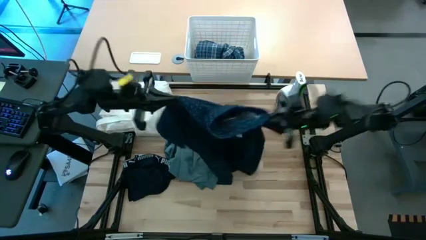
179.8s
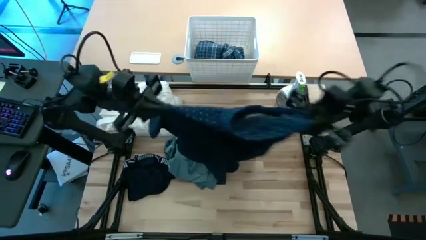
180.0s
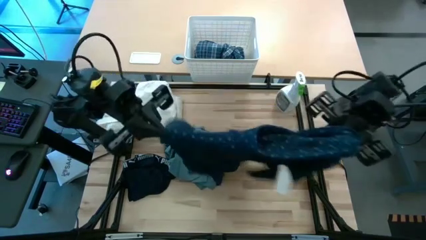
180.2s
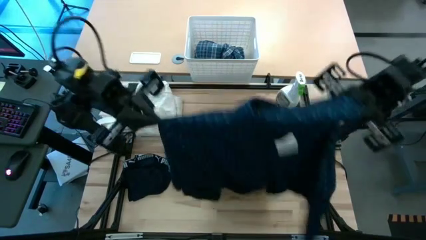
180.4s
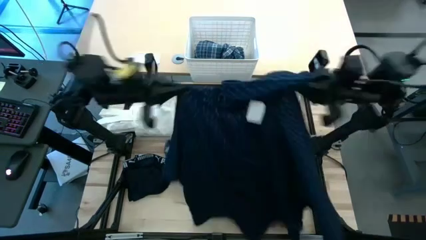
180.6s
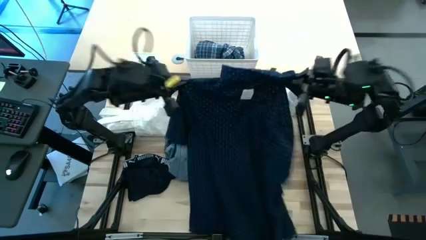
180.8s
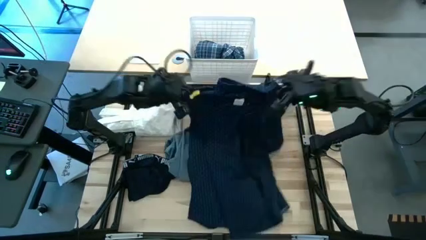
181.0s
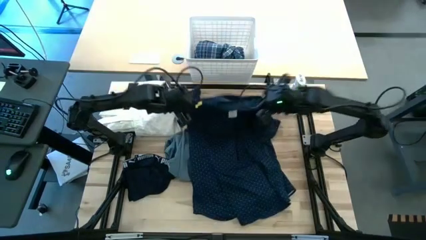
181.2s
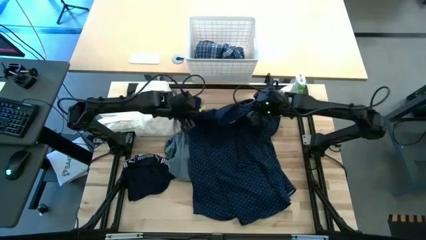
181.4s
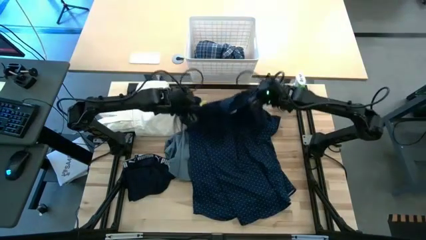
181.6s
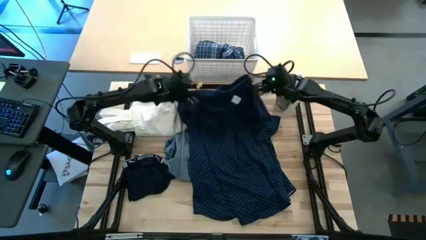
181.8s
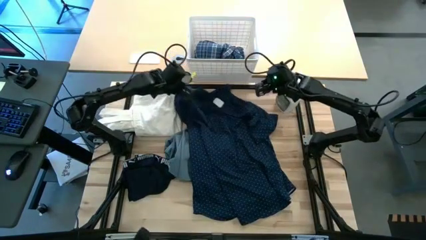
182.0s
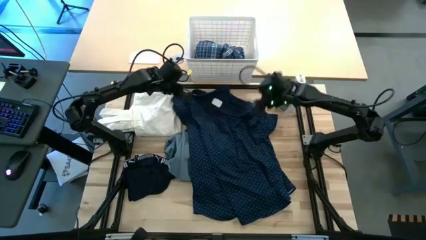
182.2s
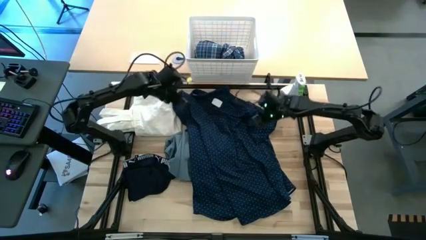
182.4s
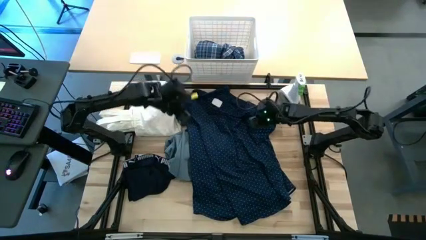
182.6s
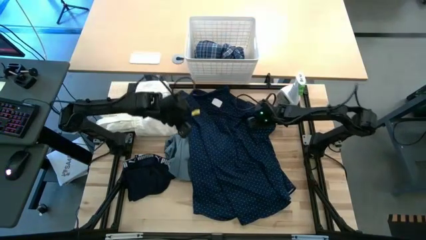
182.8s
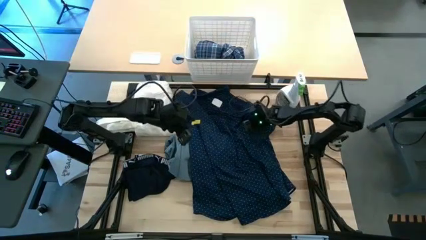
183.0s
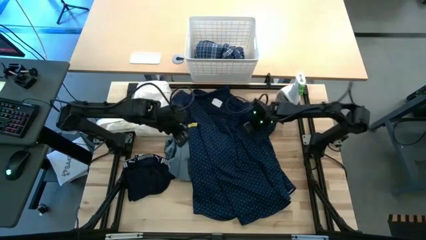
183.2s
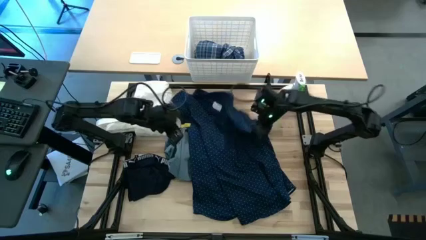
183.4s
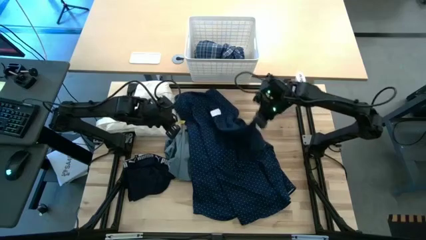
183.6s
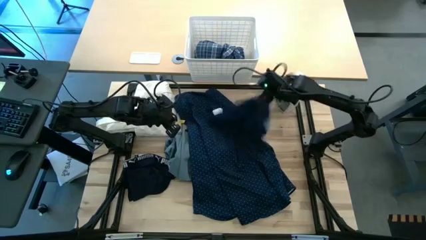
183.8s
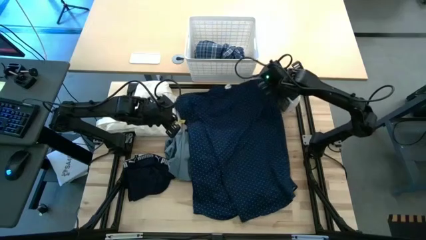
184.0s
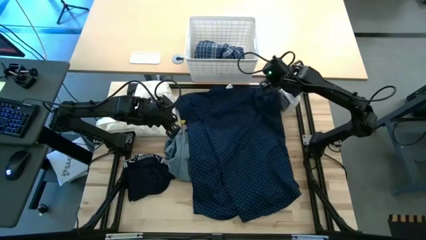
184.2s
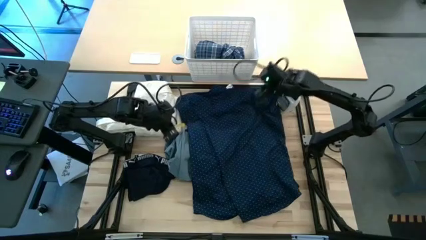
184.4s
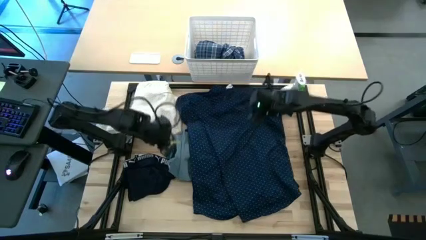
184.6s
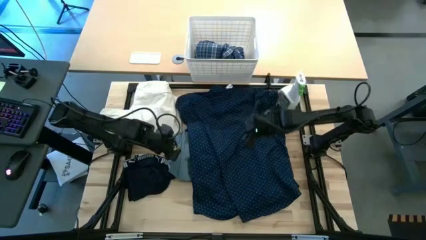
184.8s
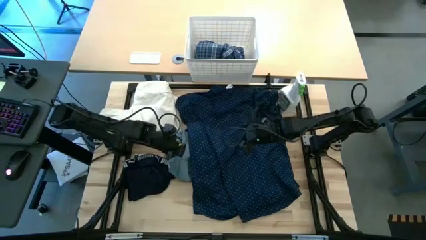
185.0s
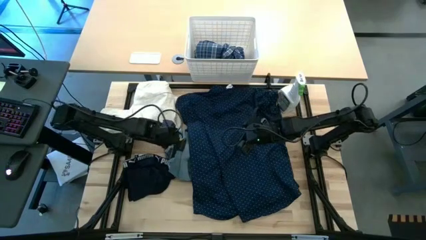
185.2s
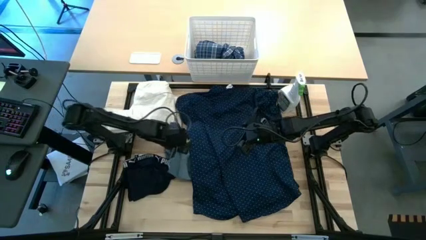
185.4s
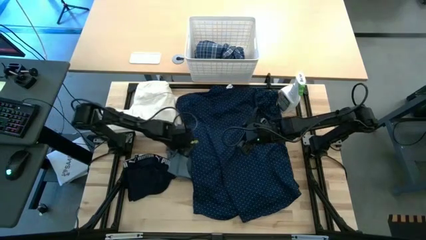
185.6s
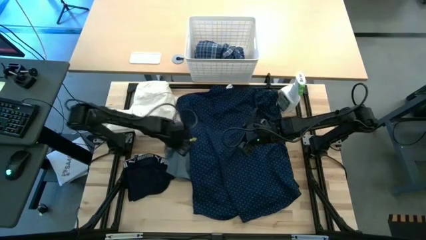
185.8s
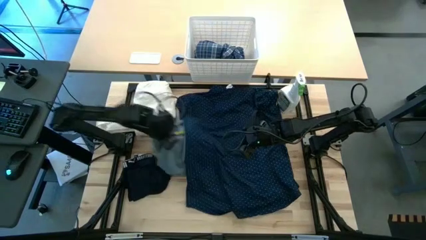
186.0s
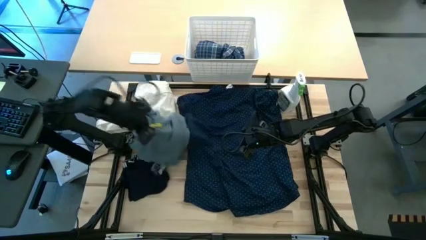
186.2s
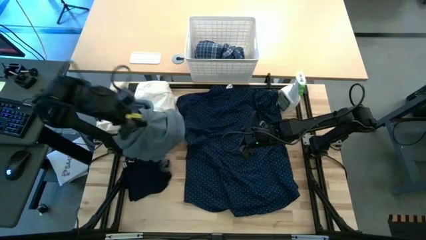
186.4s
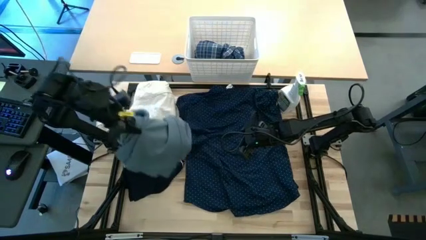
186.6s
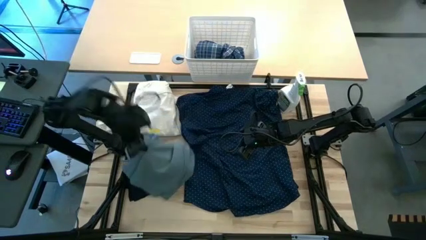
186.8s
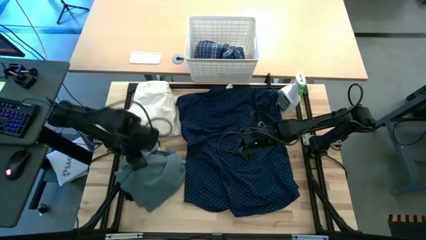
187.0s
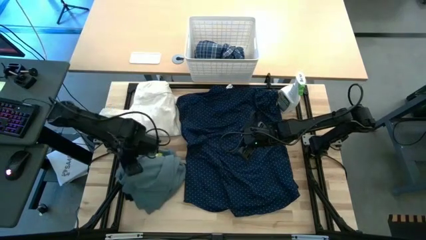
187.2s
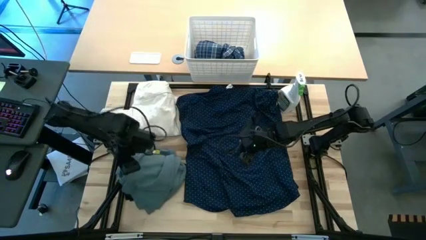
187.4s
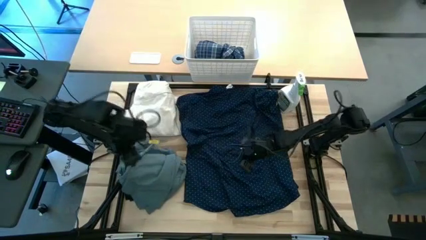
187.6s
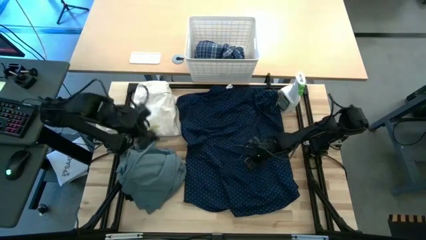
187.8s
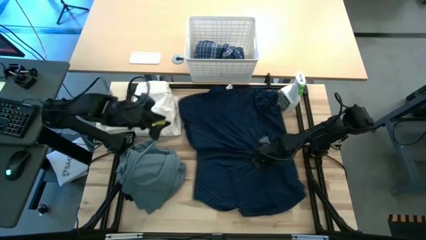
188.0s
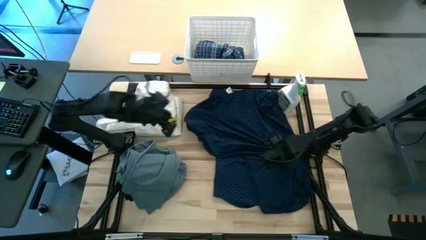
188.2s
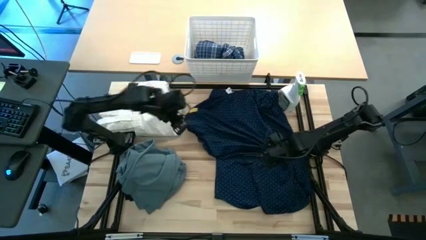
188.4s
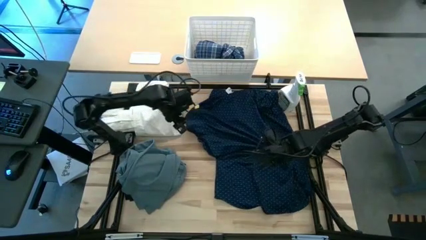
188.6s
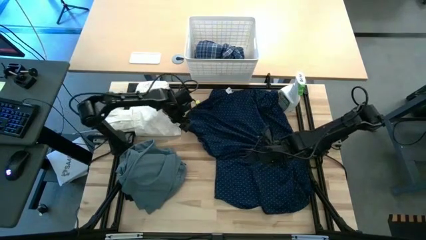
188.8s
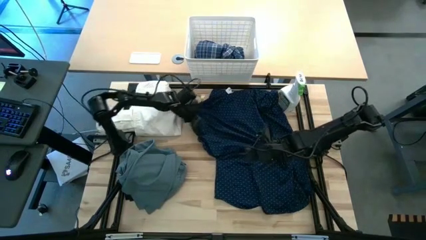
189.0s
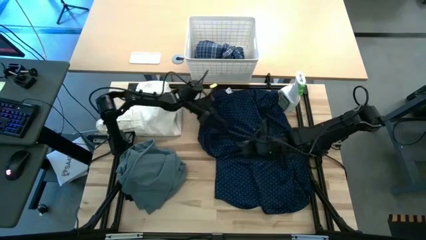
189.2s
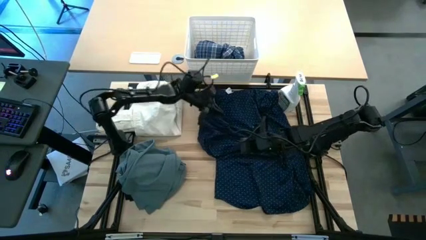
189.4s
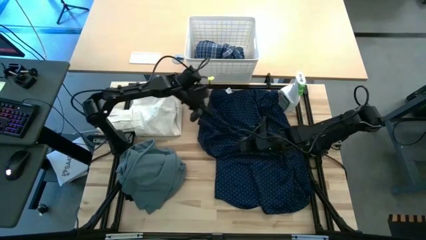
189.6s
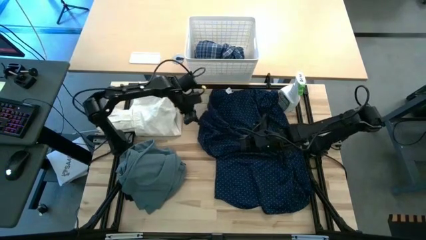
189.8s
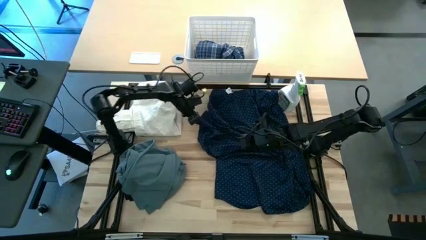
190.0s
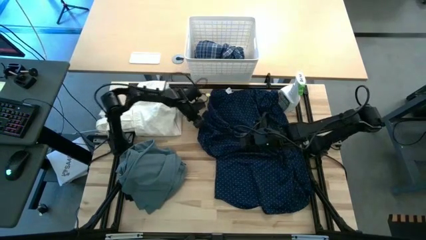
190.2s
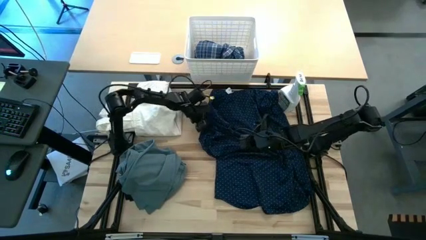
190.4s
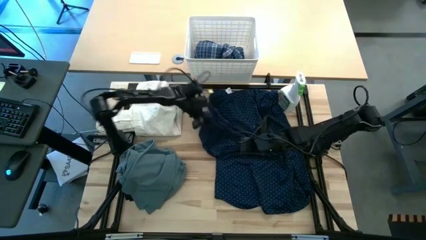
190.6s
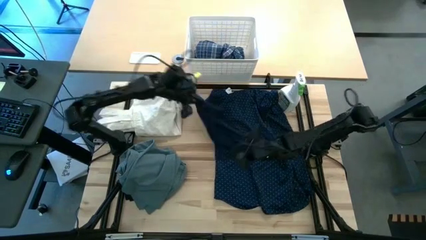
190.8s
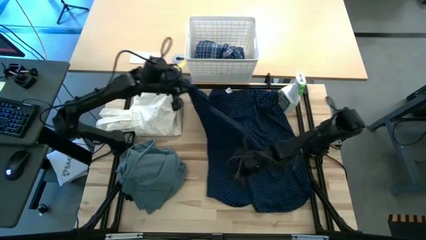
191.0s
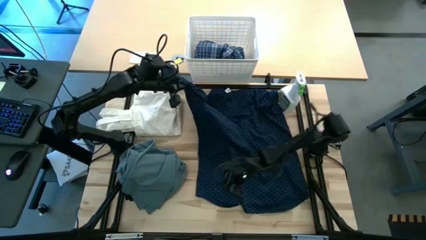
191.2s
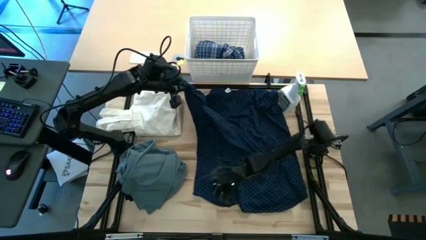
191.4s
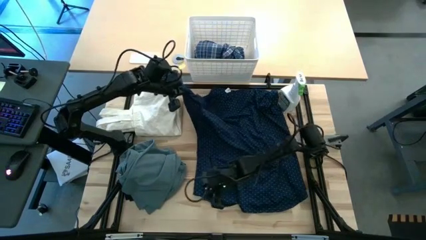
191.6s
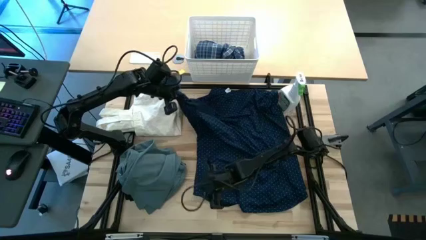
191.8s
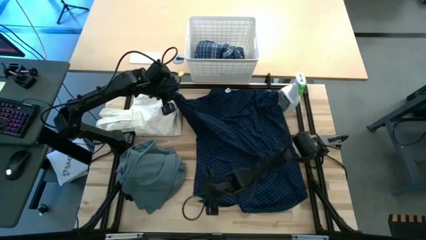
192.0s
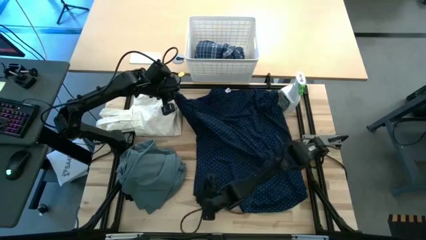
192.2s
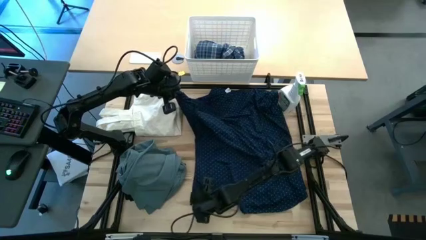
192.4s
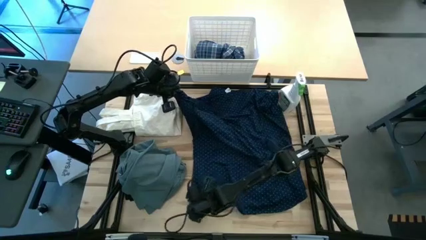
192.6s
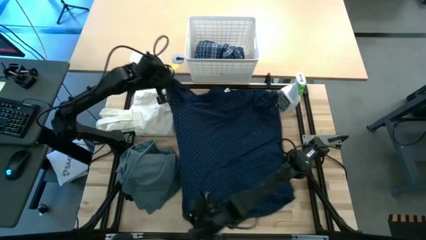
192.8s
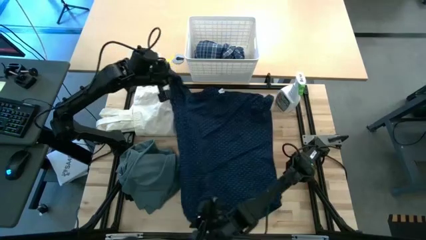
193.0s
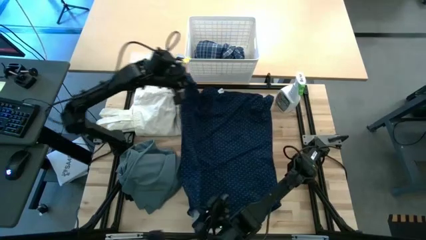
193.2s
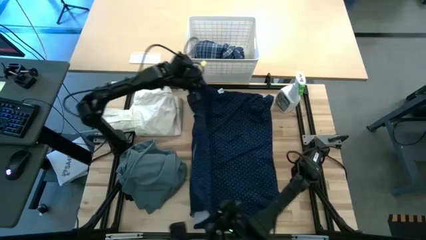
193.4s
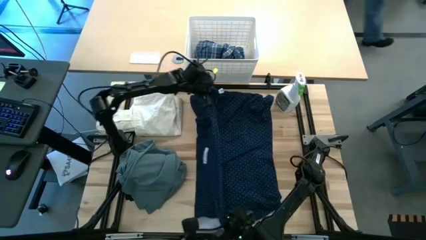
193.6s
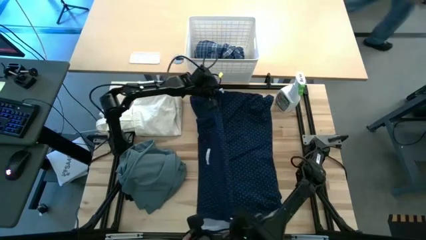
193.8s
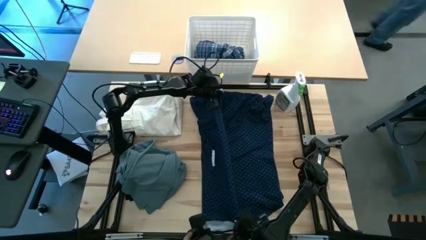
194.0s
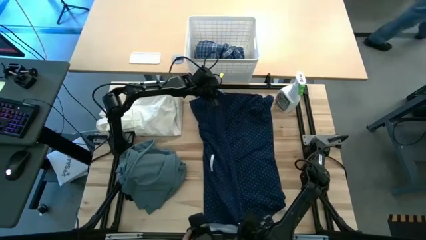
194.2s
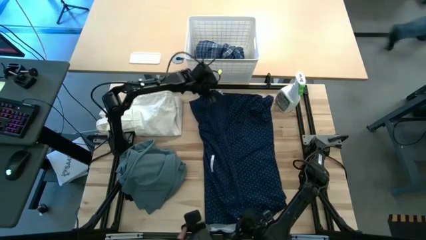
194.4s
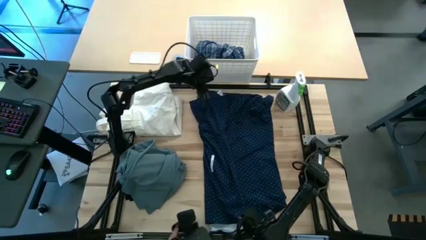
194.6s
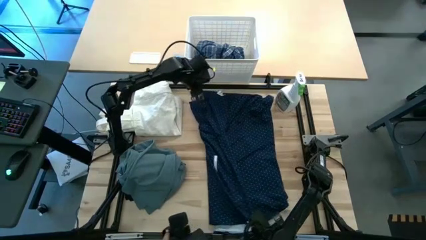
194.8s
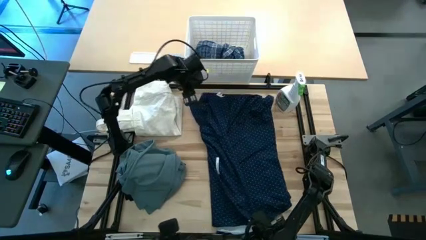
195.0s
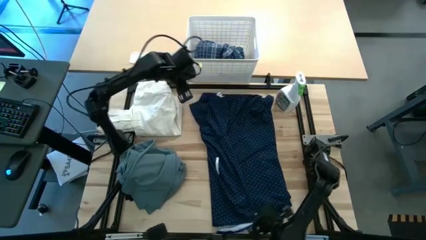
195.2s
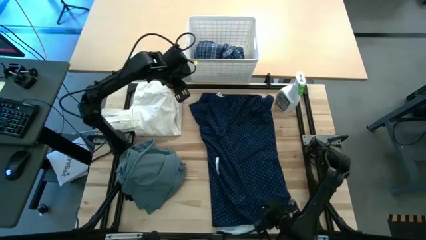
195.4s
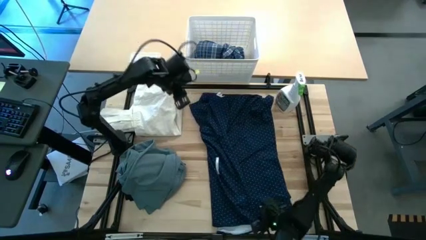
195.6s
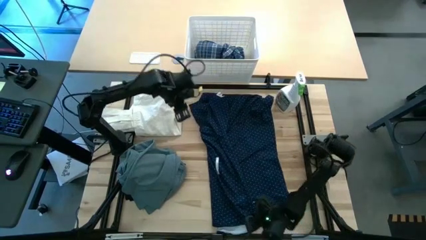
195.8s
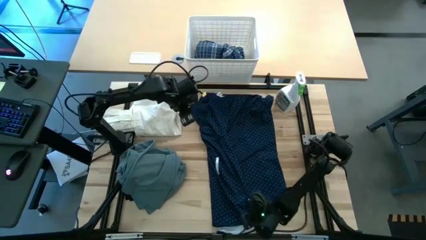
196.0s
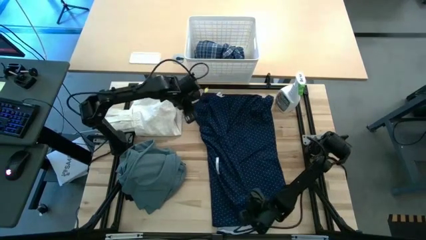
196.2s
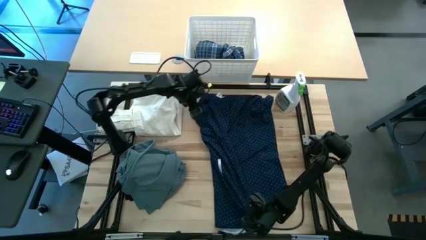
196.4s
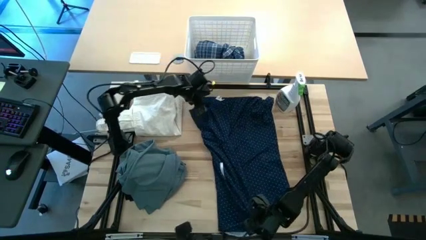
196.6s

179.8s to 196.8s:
Fold the dark blue polo
